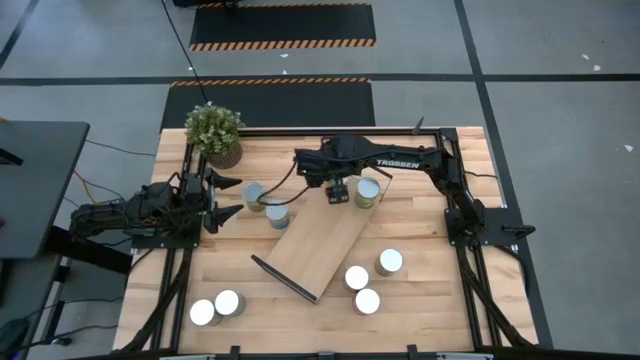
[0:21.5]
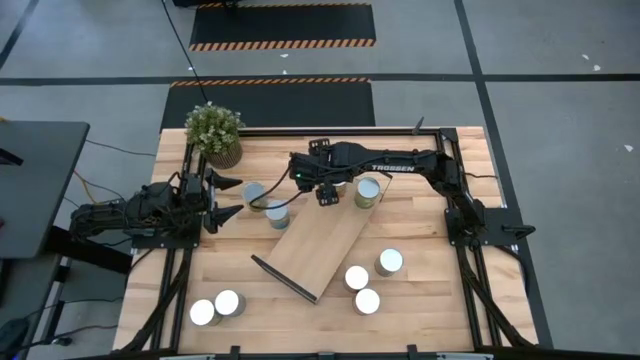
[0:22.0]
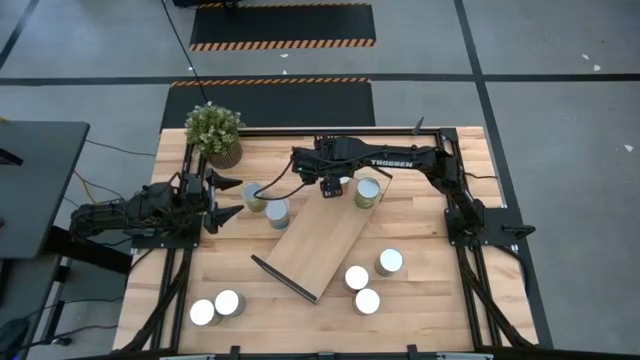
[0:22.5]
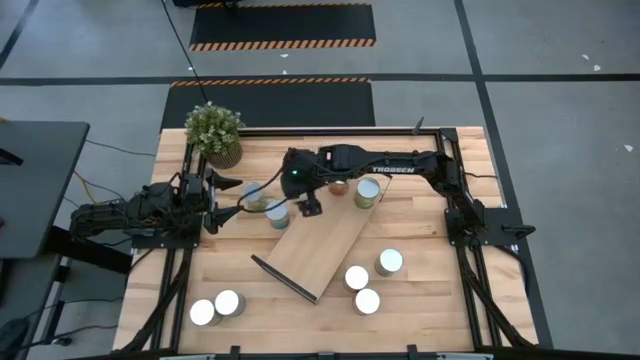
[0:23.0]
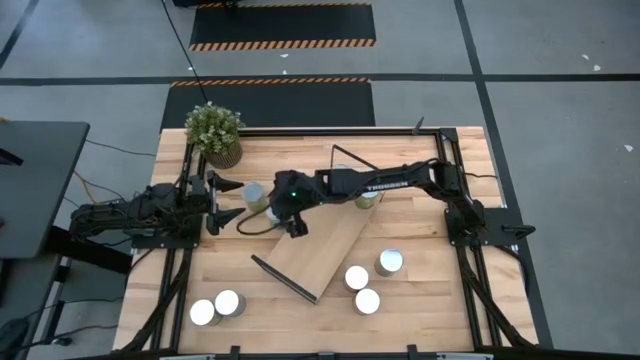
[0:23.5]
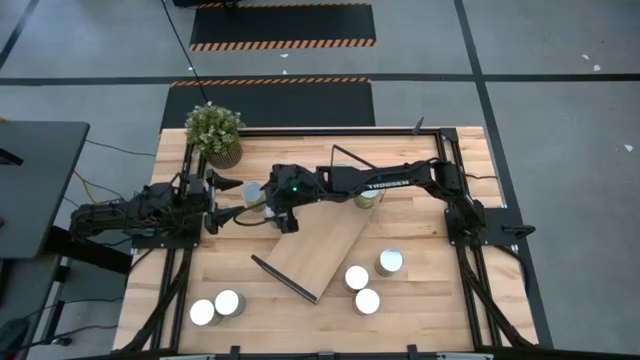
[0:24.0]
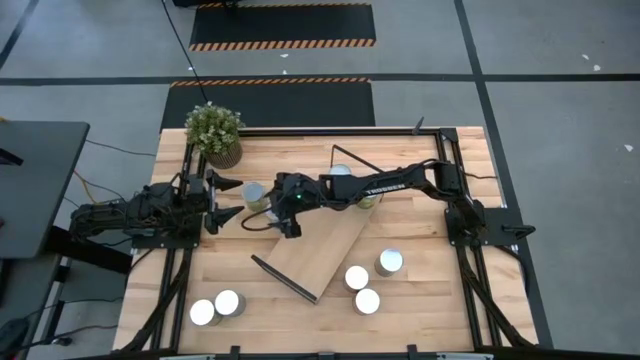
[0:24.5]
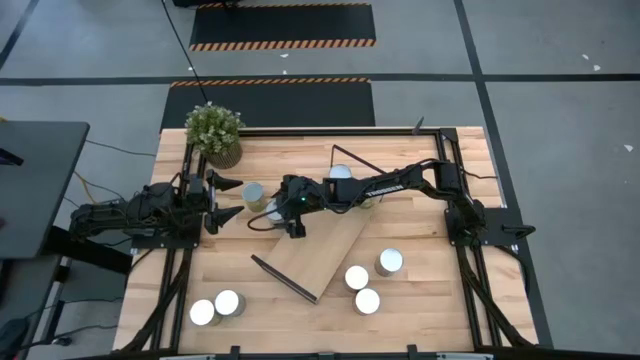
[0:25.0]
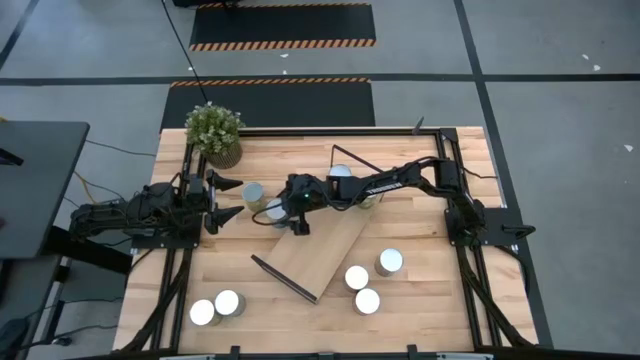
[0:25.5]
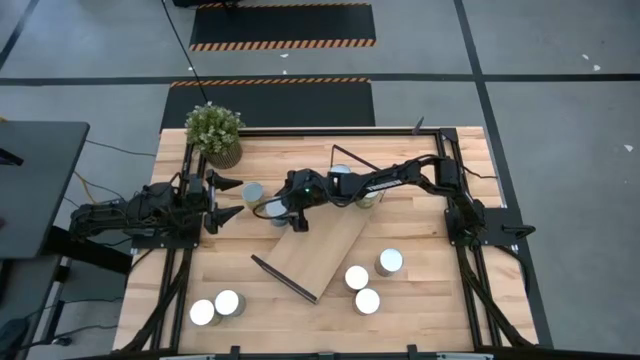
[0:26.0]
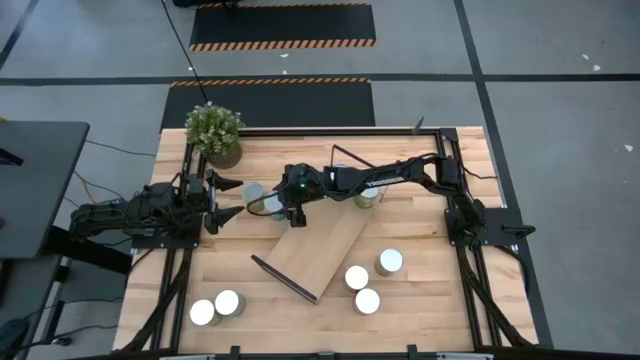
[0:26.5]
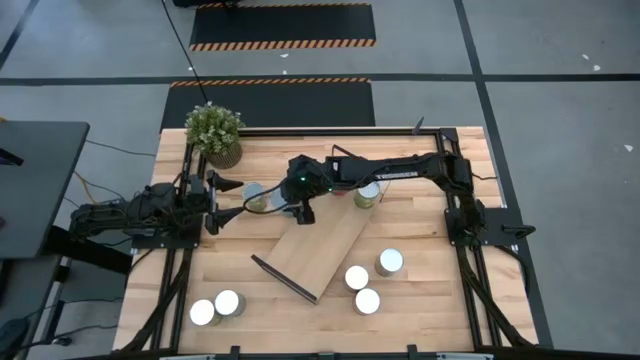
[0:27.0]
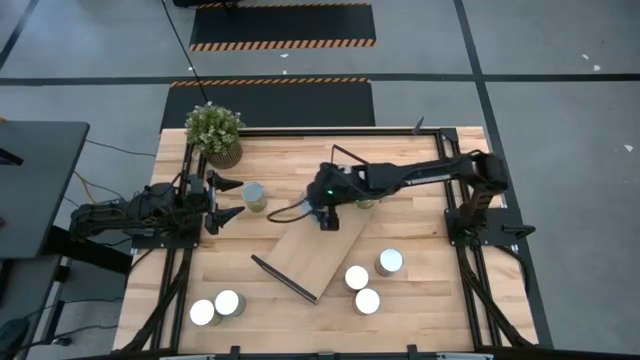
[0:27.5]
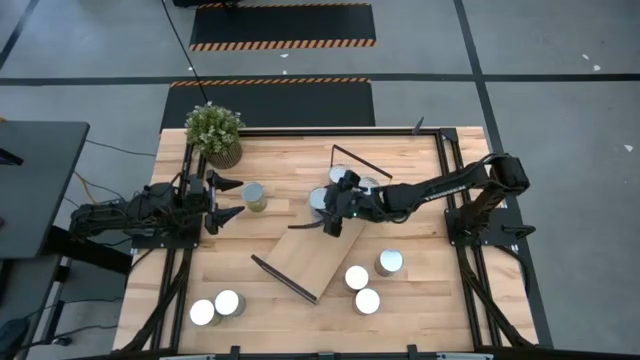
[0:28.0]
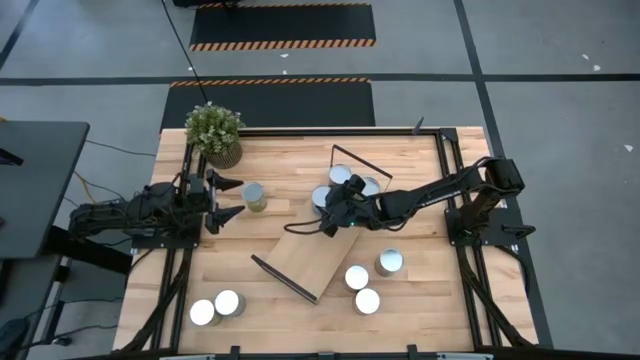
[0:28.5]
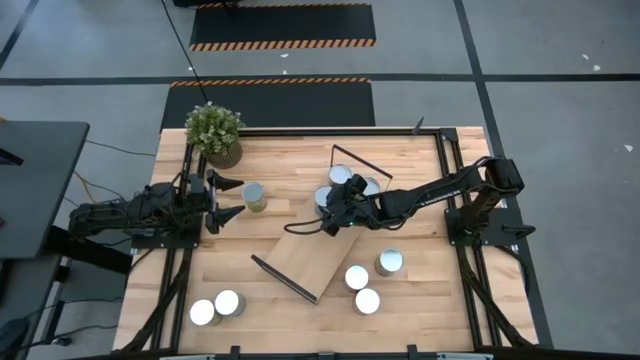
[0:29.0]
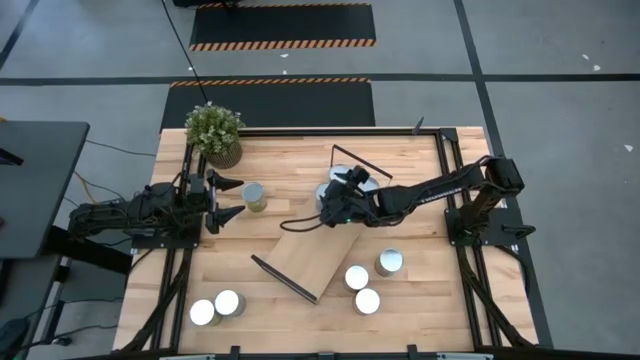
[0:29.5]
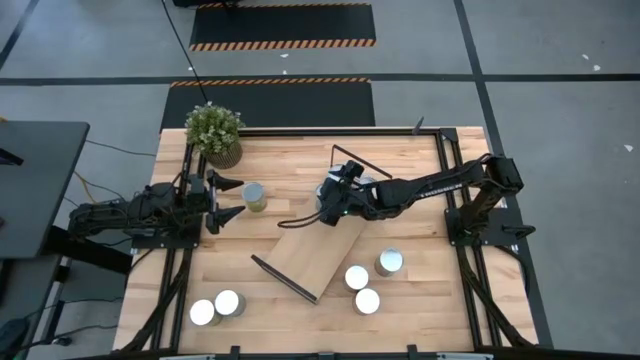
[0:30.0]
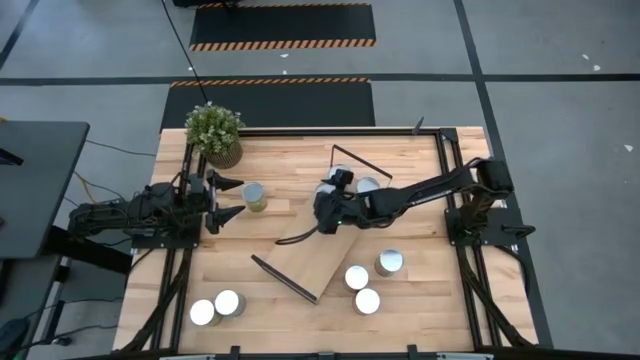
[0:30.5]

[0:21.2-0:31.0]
Task: Pick and place cans onto a shelf
Put the canned tomatoes on the shelf

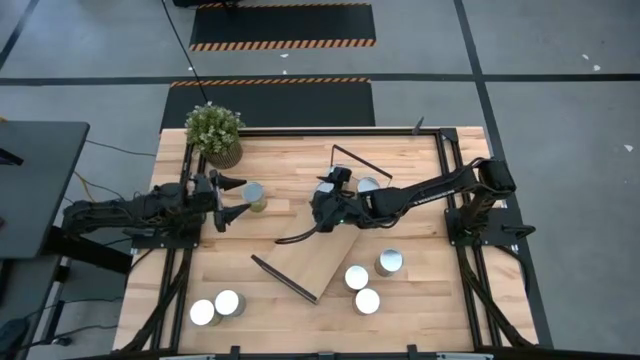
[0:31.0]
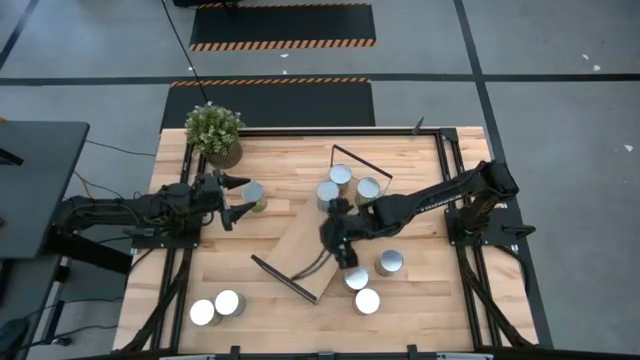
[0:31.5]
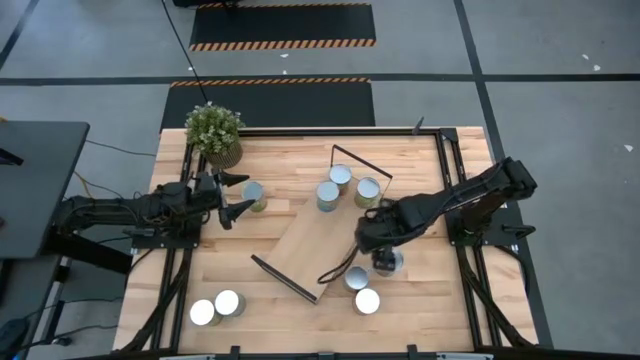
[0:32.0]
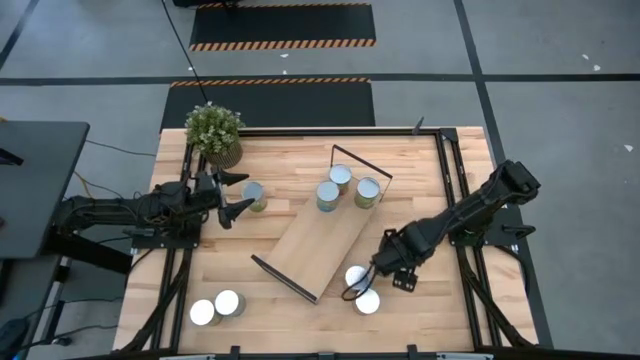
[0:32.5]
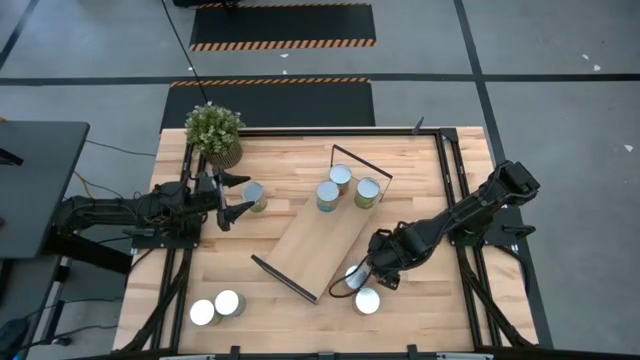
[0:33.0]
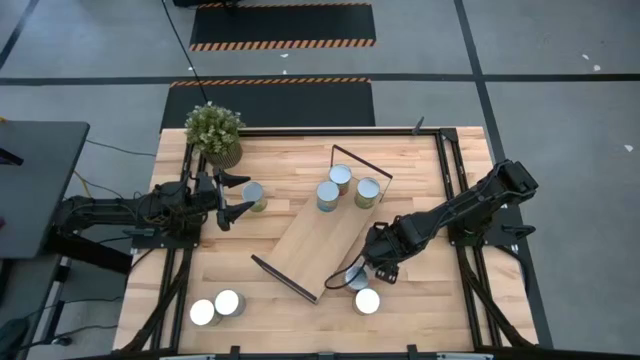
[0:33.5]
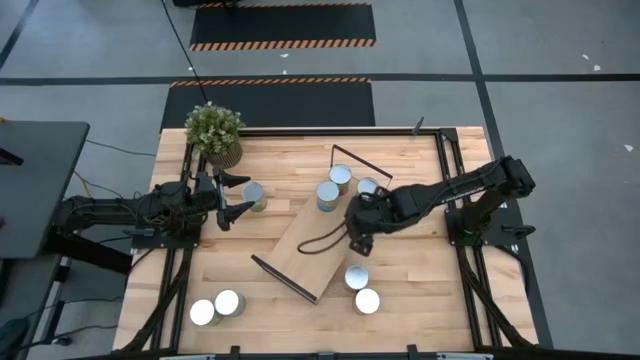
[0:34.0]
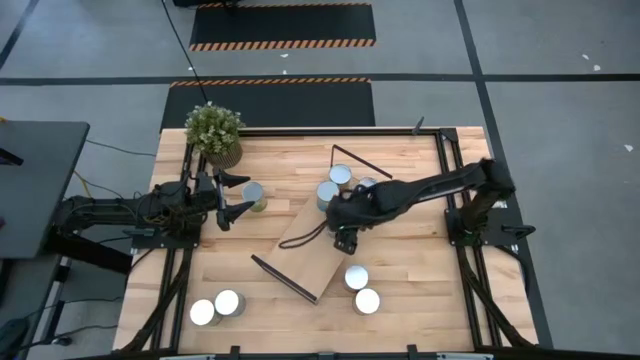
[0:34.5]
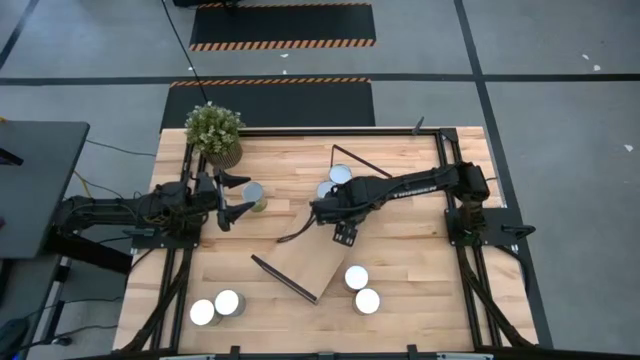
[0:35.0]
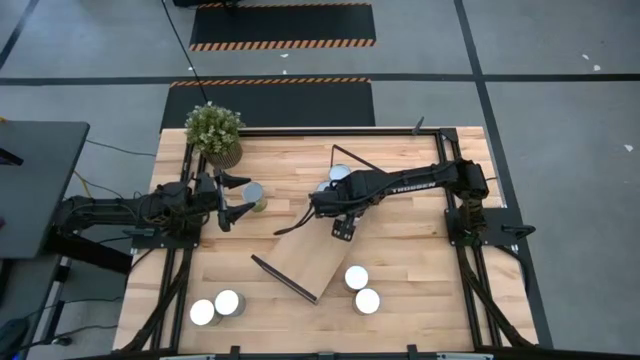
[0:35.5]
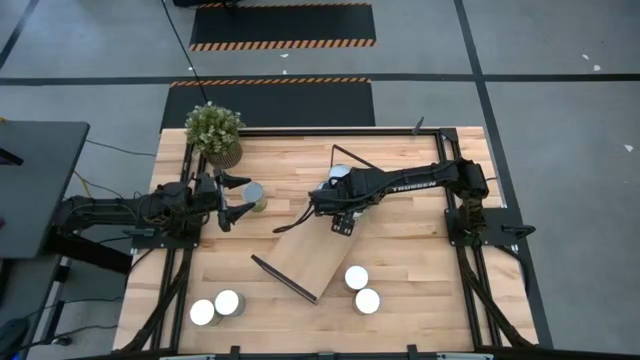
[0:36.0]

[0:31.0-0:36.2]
Put the canned peaches on the shelf

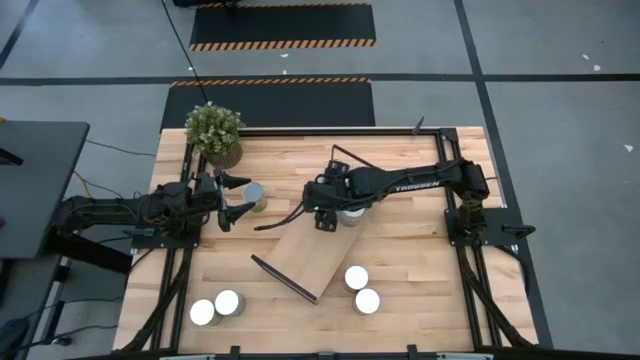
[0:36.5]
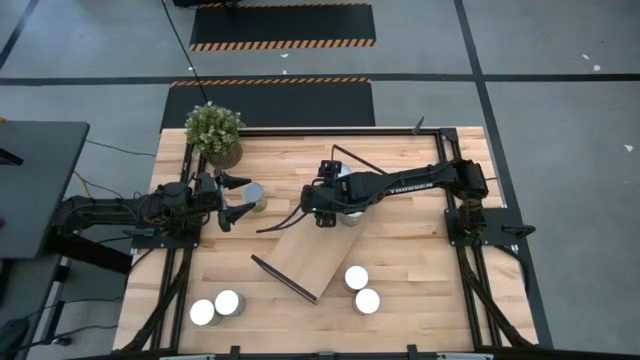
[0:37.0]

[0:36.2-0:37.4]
Adjust the canned tomatoes on the shelf

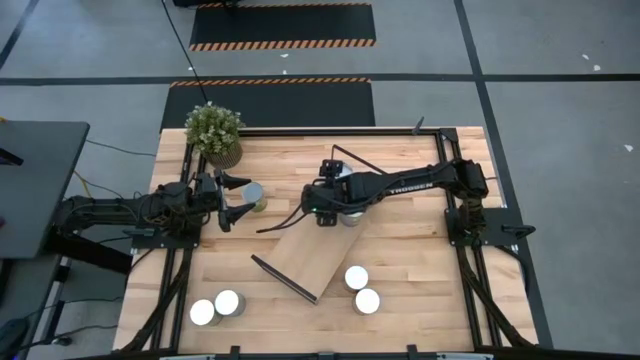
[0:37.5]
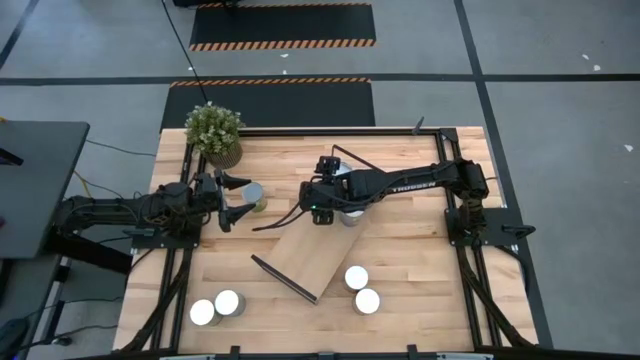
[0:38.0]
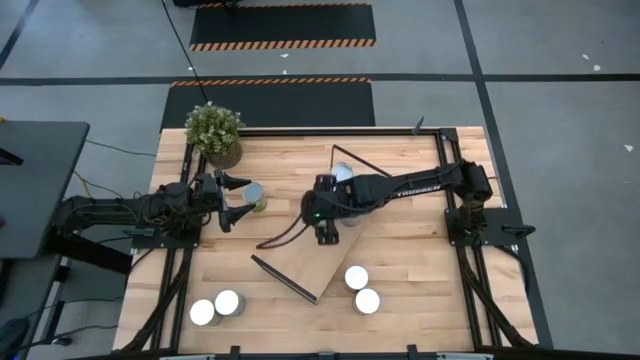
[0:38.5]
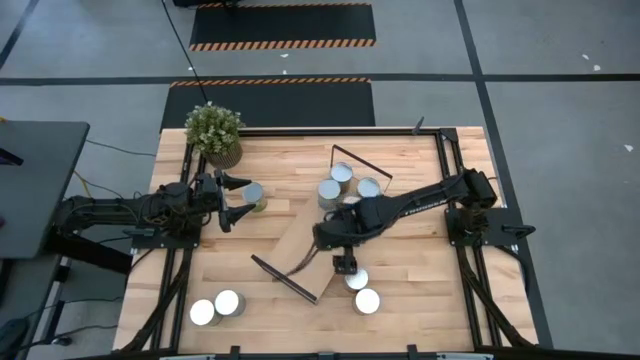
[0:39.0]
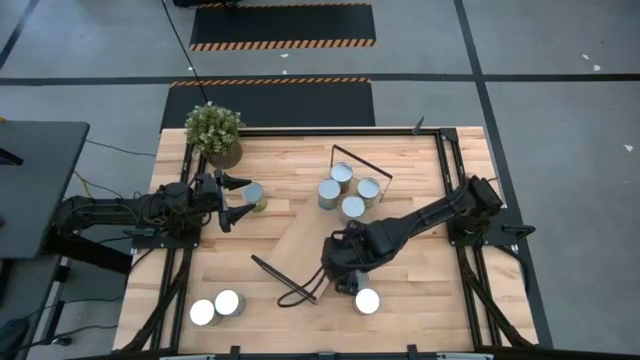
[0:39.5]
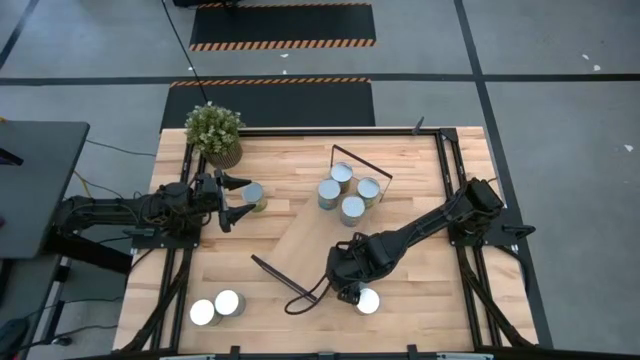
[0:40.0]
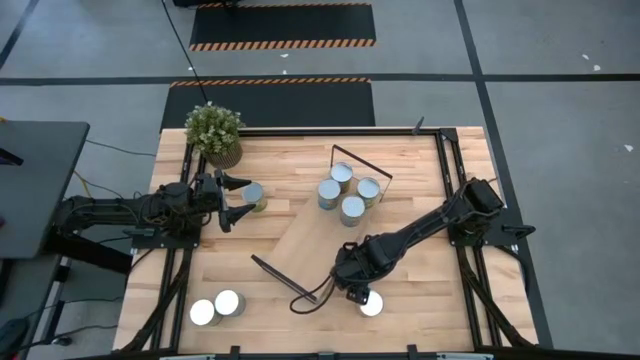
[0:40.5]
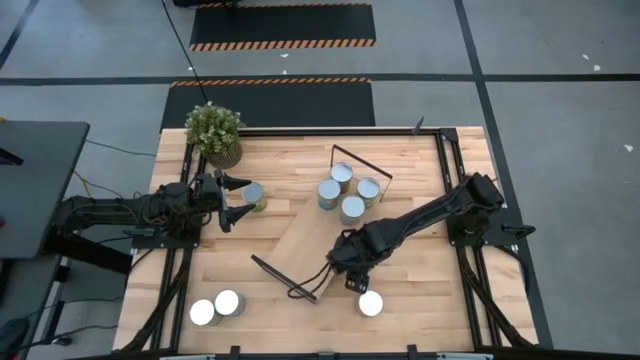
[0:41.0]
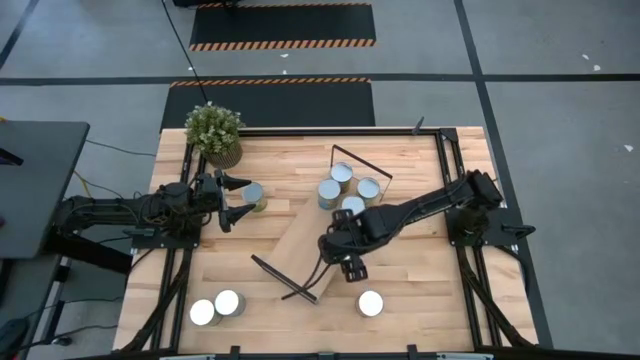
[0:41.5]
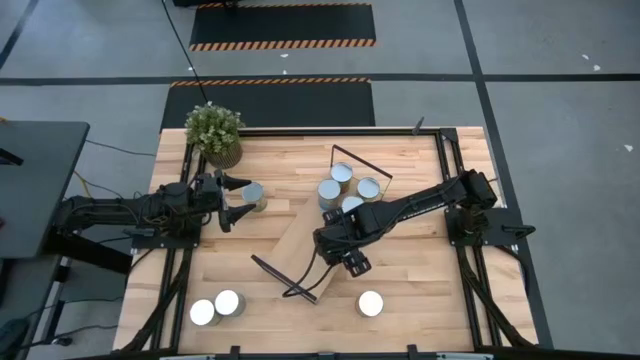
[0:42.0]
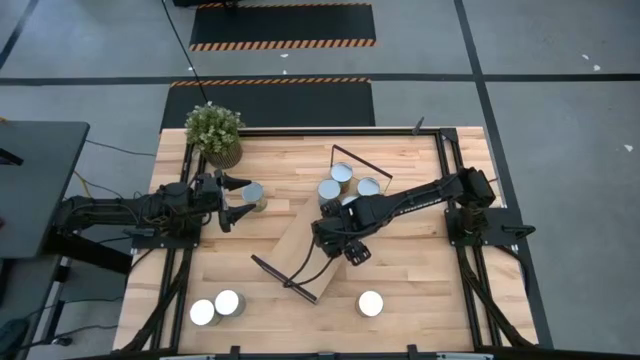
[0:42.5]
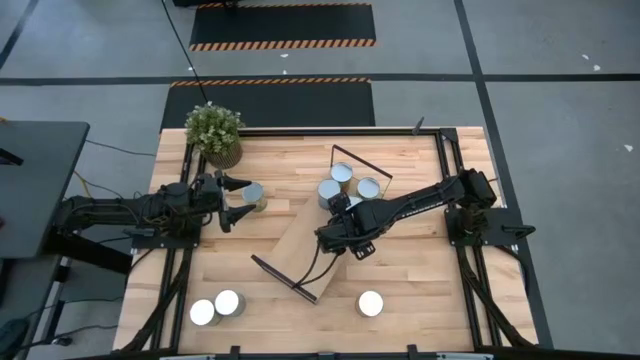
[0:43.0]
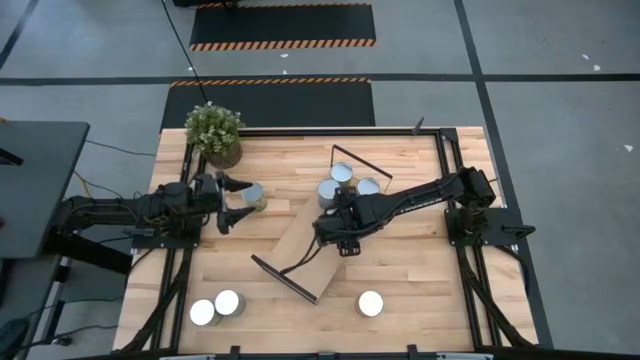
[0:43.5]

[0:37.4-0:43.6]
Put the canned pineapple on the shelf
